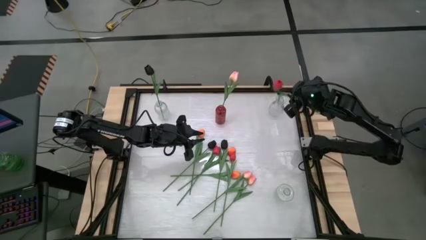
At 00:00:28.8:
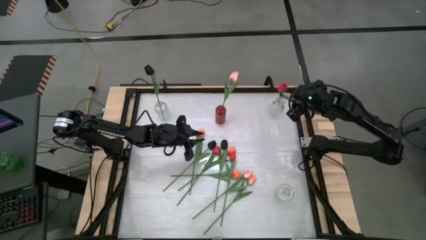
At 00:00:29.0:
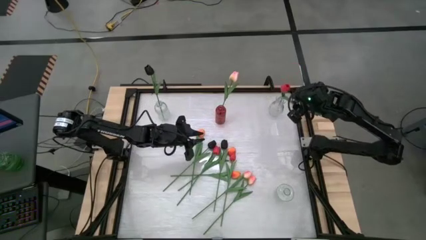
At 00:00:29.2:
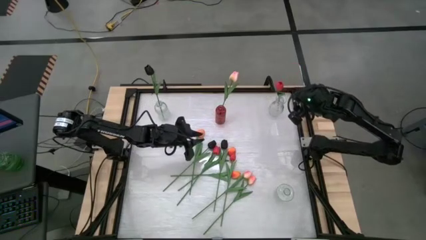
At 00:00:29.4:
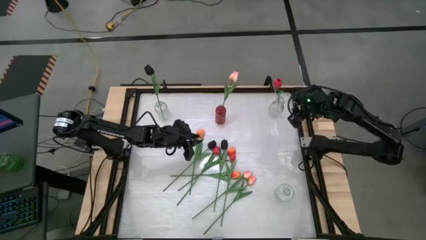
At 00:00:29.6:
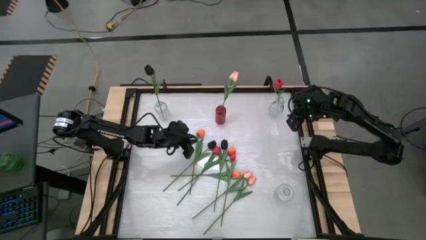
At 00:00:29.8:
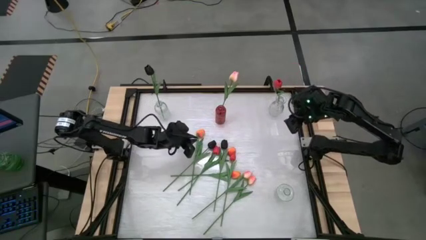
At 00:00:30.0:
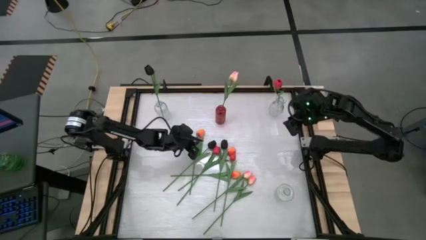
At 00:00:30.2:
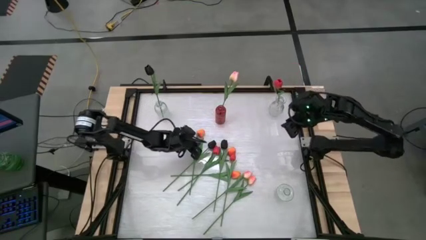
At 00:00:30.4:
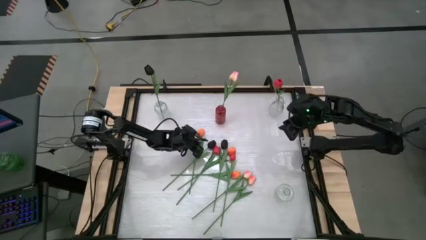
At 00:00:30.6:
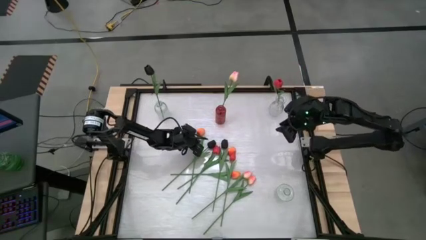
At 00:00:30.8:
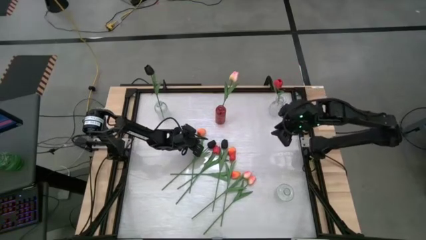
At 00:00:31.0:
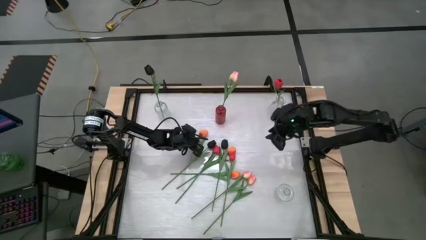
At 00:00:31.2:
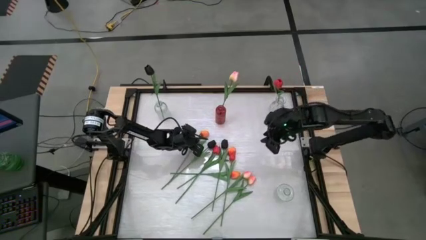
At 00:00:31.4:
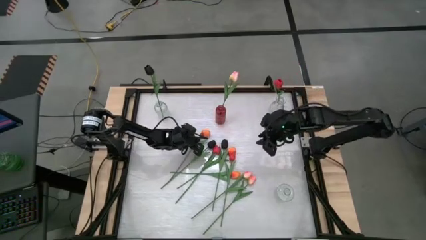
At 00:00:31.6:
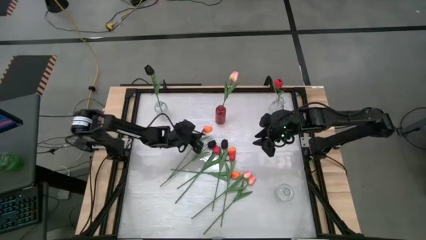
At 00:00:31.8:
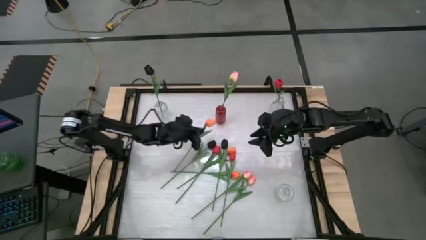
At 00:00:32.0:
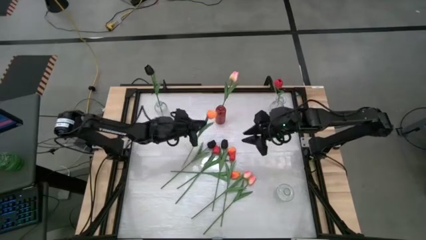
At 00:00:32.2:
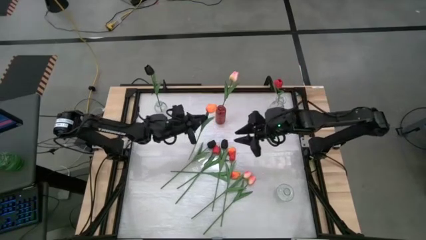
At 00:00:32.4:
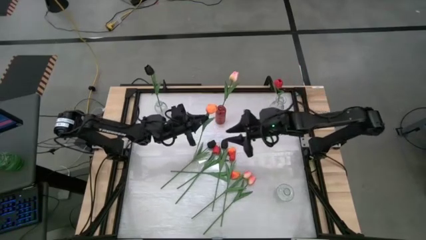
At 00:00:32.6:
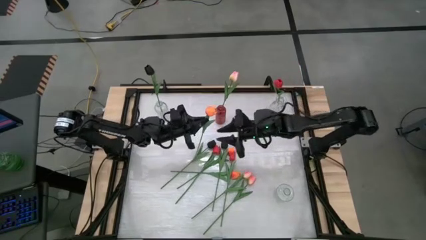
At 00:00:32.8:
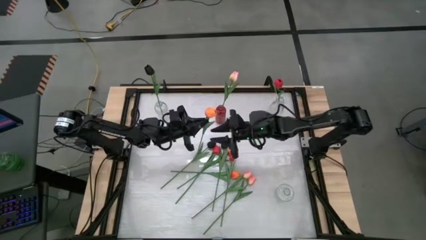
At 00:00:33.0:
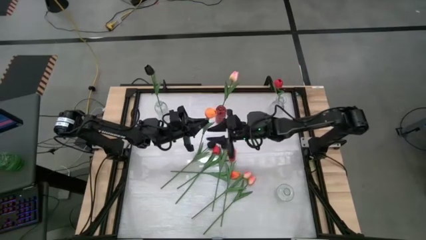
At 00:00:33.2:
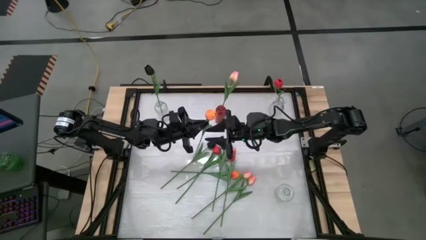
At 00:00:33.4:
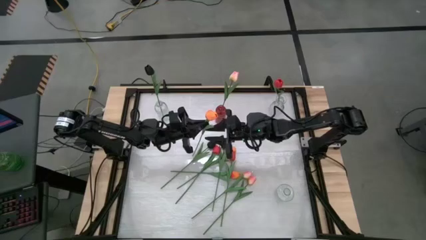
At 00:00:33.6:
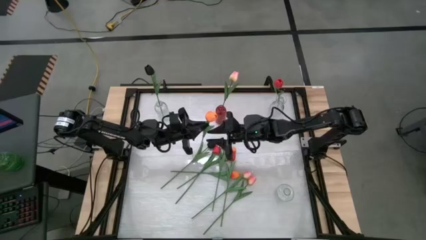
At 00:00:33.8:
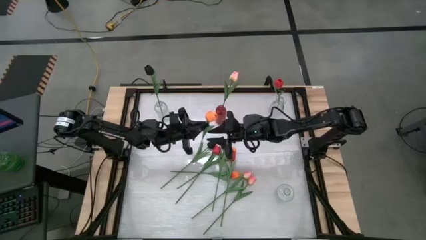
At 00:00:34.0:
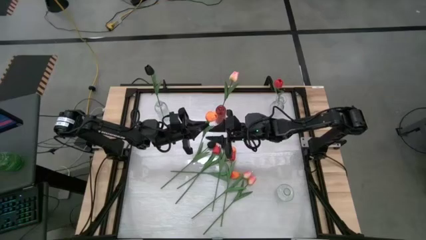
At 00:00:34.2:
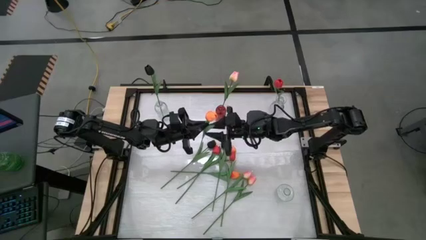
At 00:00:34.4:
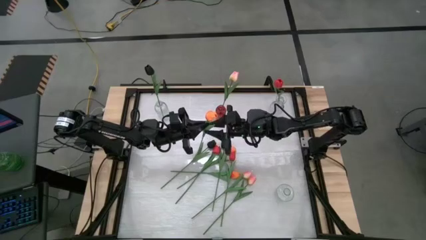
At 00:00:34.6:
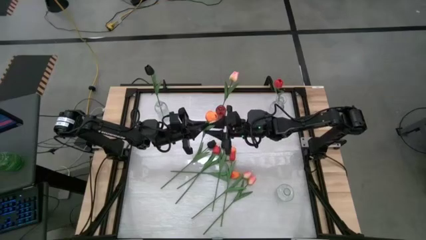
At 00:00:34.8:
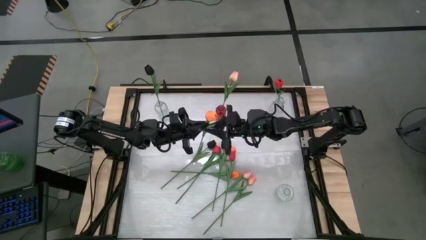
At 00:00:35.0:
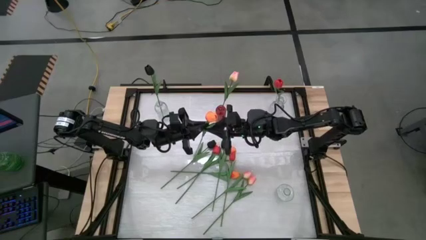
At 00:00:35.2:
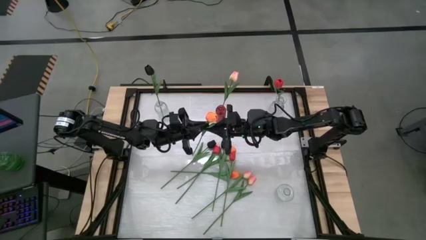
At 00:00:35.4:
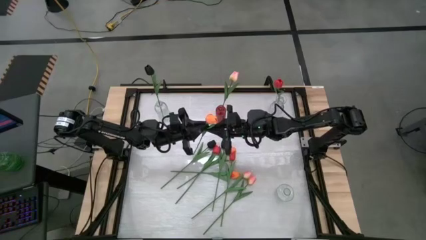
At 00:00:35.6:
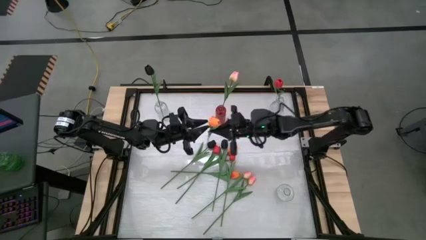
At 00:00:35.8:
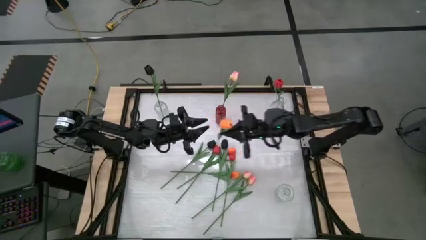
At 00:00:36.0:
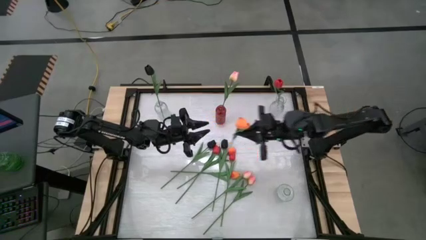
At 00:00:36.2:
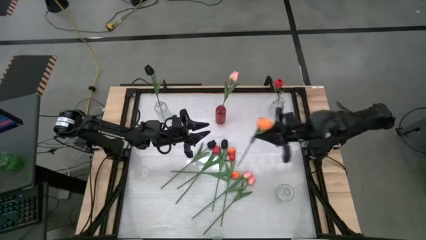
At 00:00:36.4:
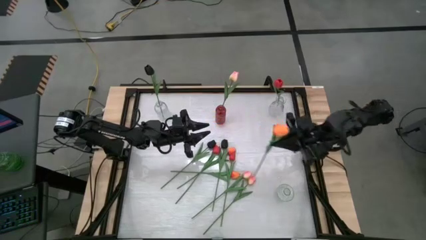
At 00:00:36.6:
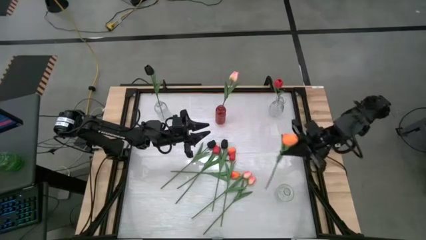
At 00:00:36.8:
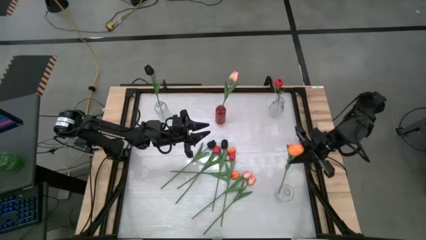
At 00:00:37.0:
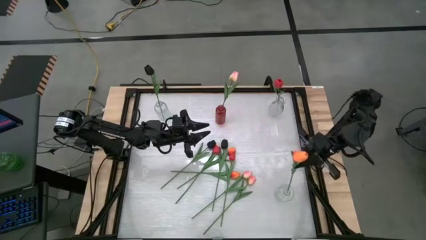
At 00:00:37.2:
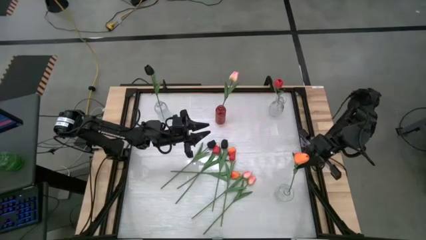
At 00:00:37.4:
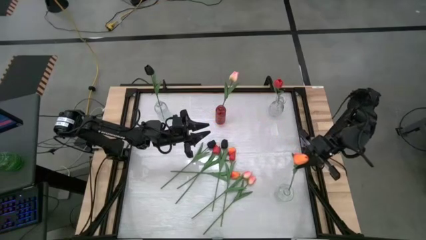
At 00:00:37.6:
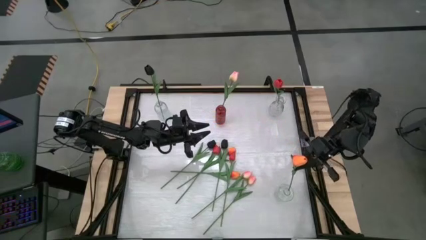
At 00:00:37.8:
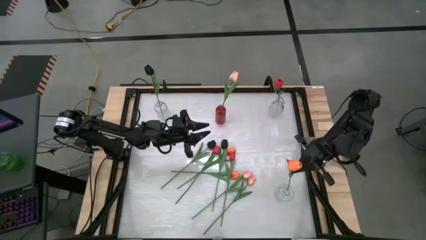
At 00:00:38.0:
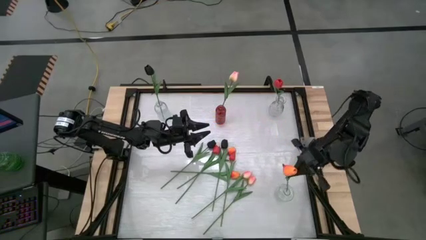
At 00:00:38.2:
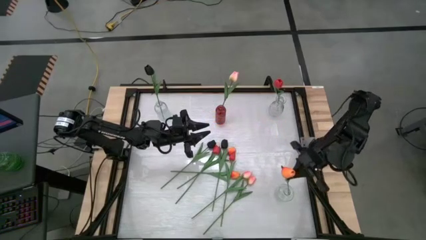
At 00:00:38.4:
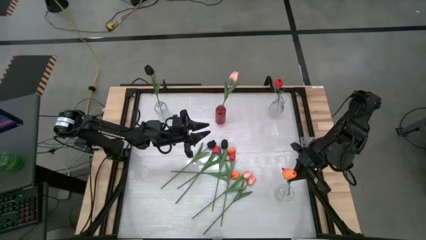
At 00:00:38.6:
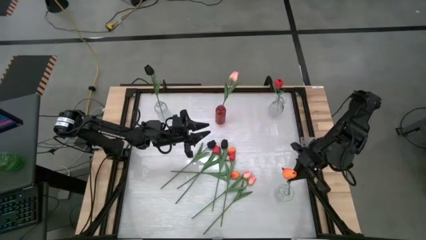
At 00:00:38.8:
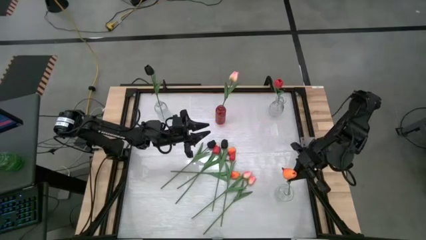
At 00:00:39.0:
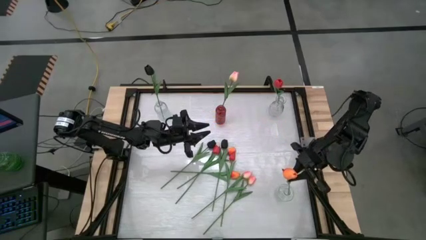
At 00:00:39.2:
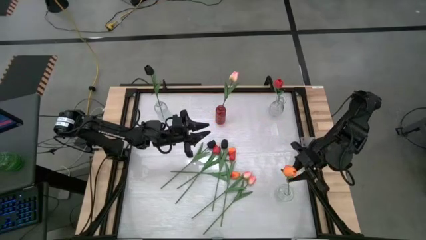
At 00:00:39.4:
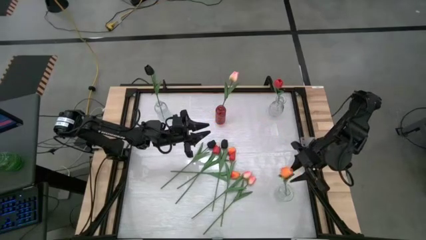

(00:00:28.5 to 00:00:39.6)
Task: Sort flowers into vase by color
Put the top orange flower into the bottom transparent vase
